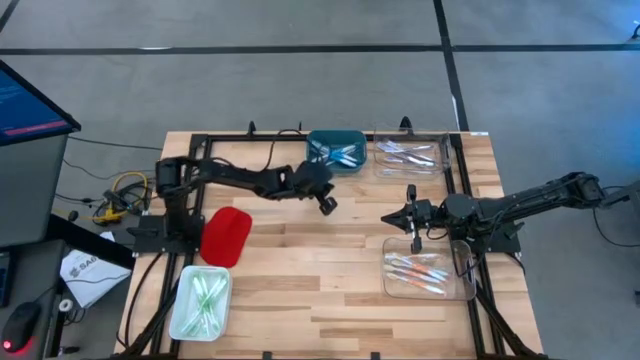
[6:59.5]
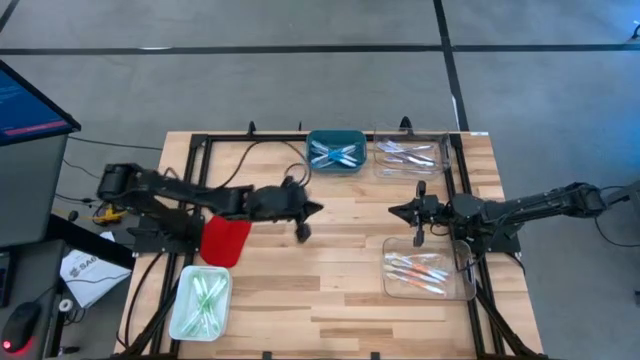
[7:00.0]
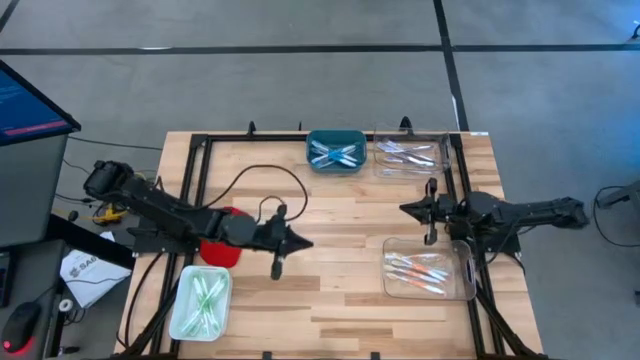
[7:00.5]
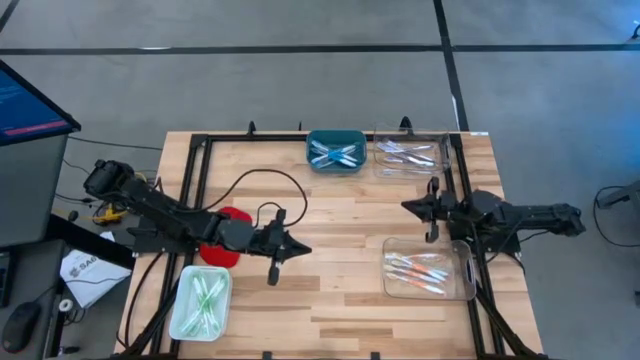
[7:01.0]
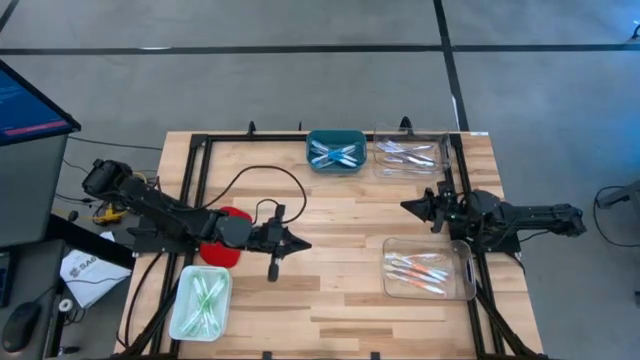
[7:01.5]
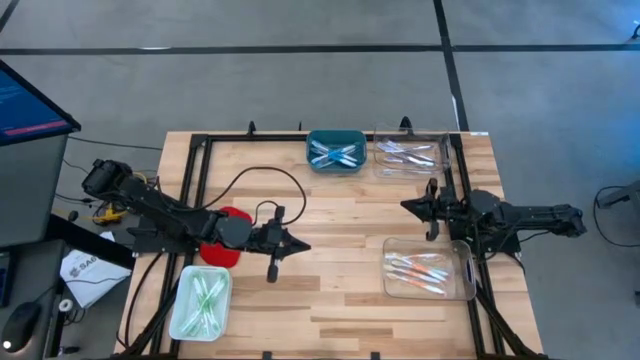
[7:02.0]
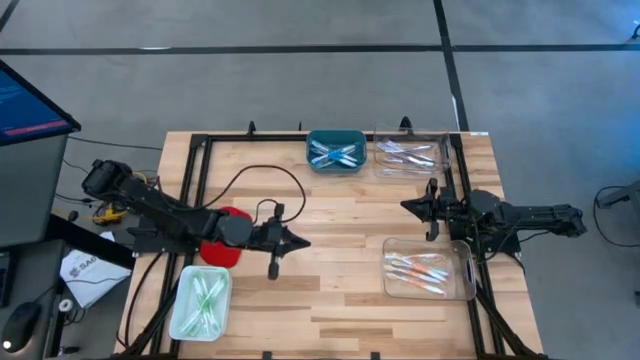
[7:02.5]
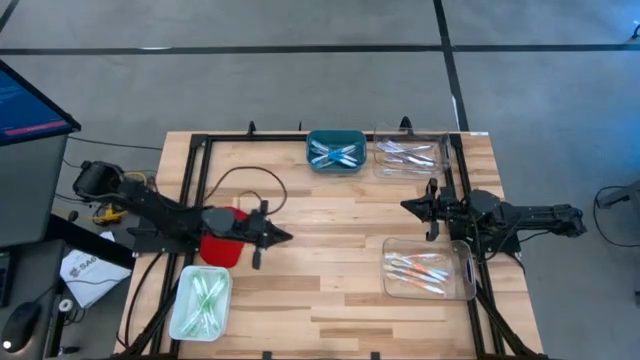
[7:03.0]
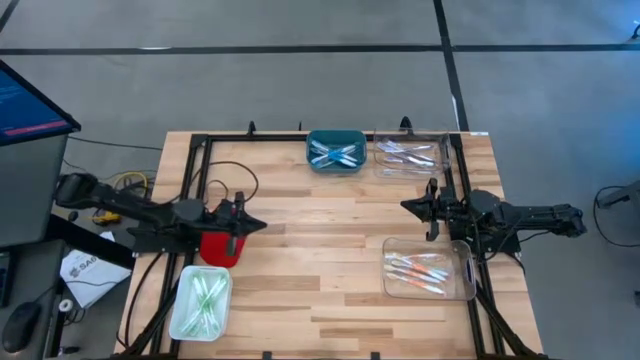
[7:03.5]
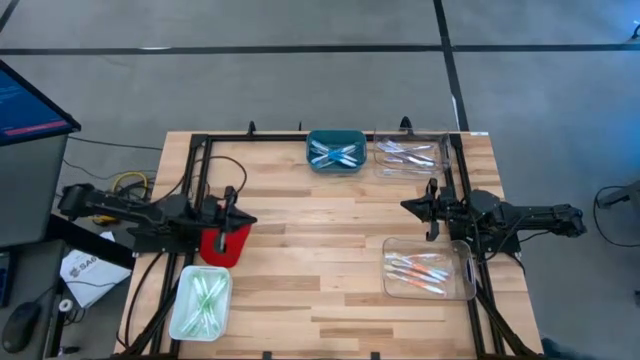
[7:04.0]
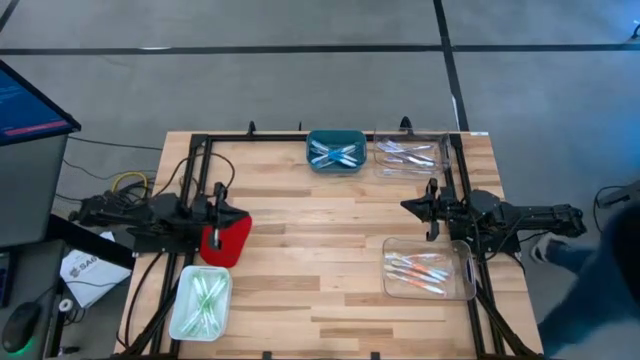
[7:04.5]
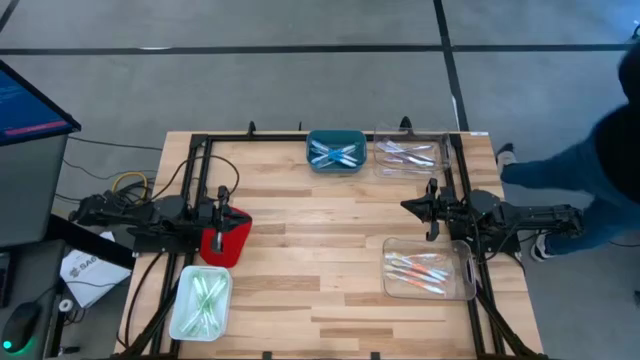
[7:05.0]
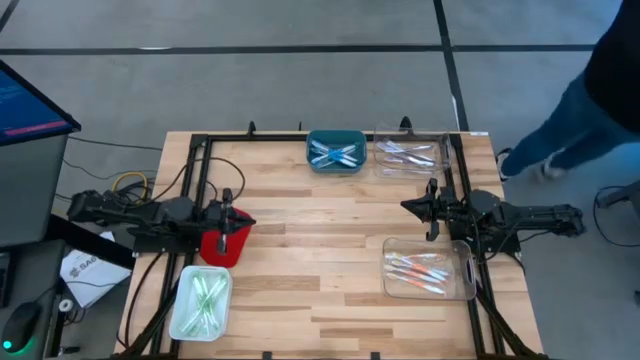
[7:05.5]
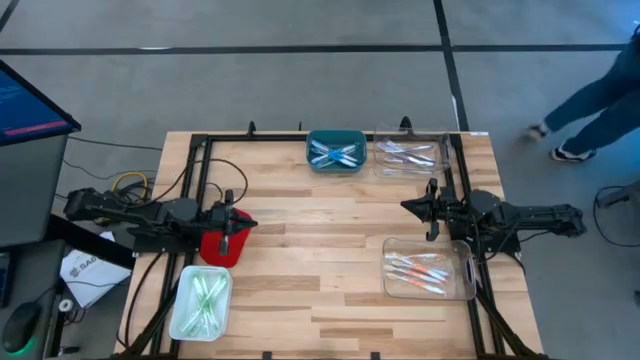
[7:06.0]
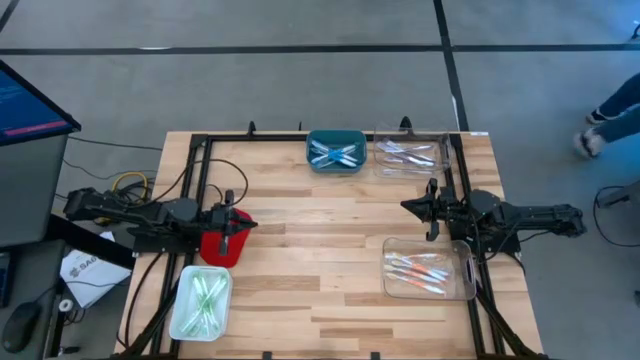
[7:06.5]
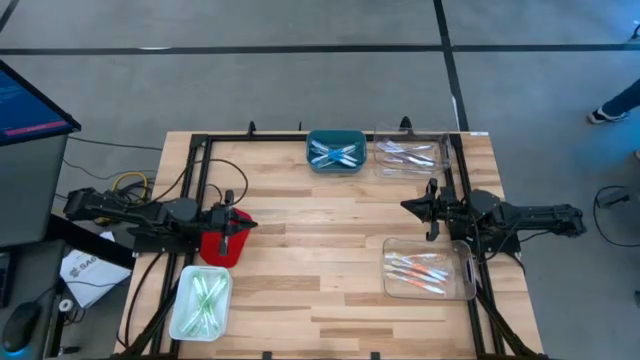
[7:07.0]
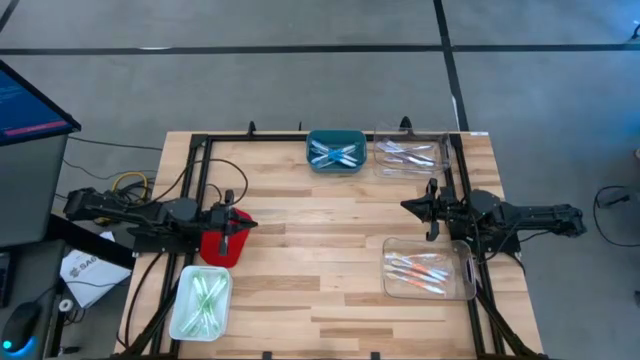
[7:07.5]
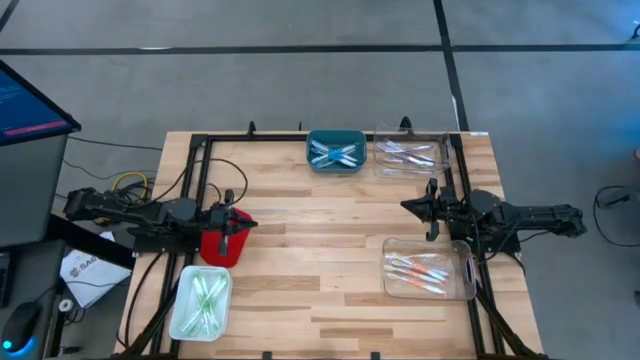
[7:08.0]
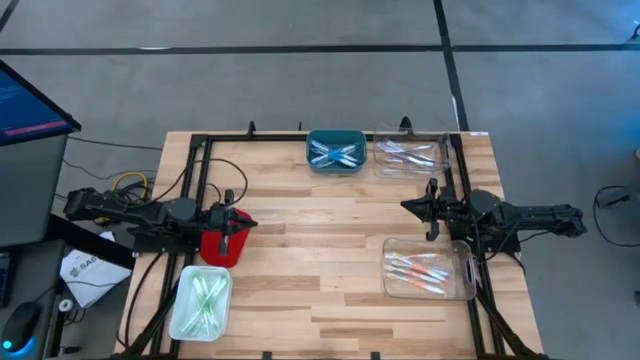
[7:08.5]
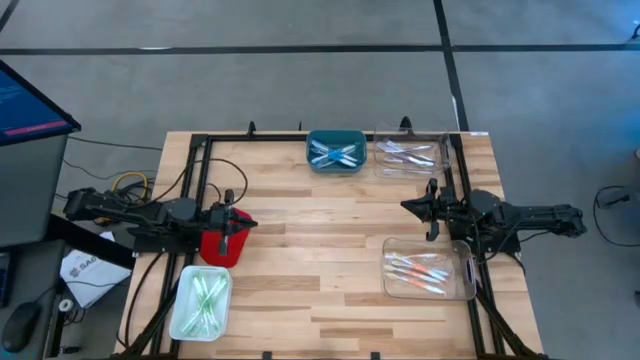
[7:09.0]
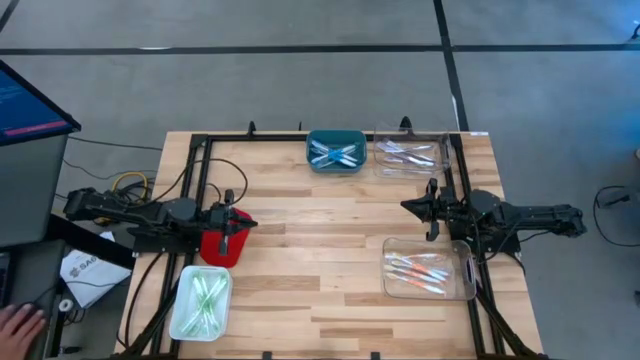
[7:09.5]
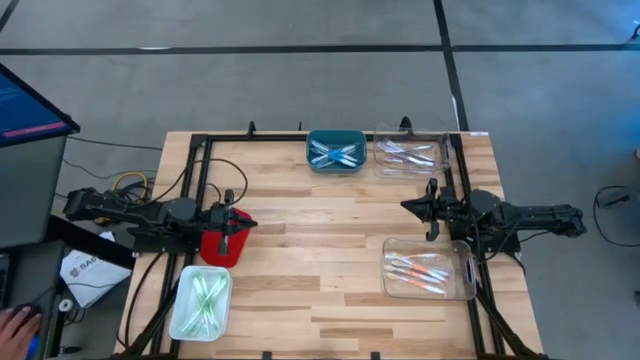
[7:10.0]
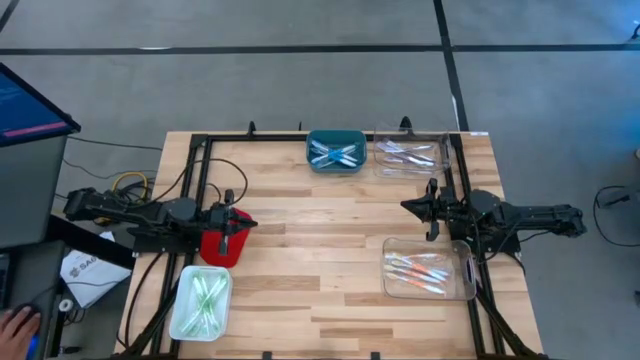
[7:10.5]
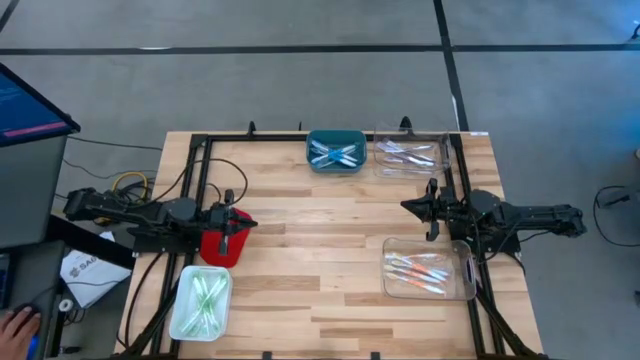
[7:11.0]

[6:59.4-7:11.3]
Task: Pick & Place Toothbrushes
Return to Home Position

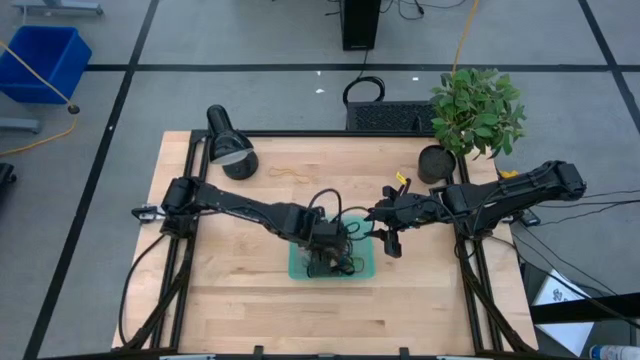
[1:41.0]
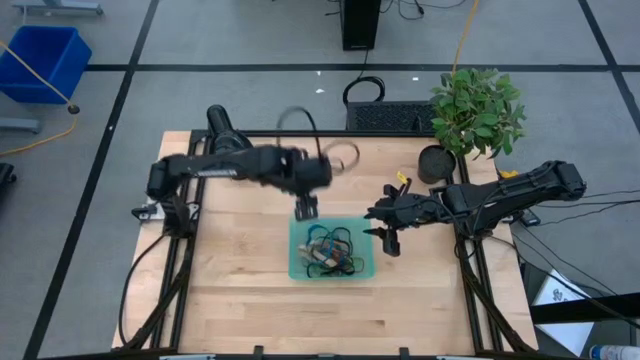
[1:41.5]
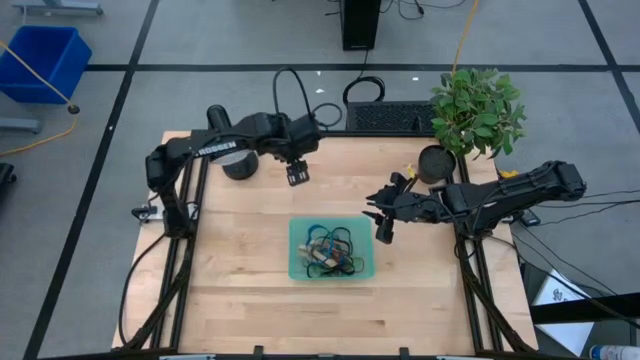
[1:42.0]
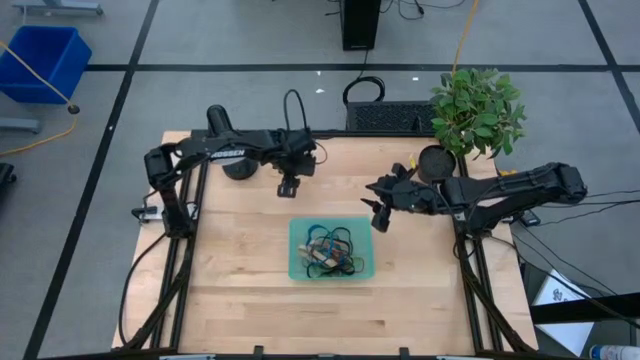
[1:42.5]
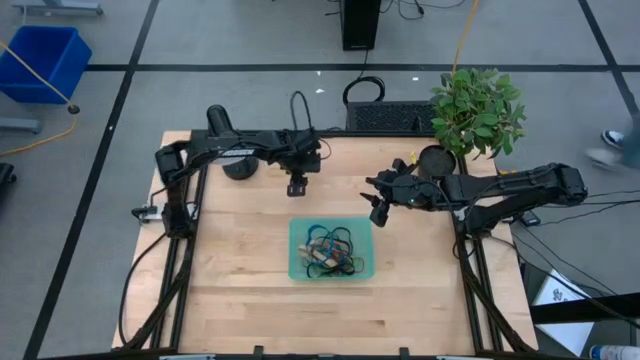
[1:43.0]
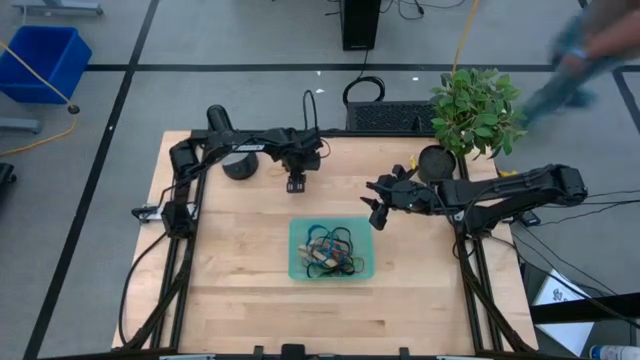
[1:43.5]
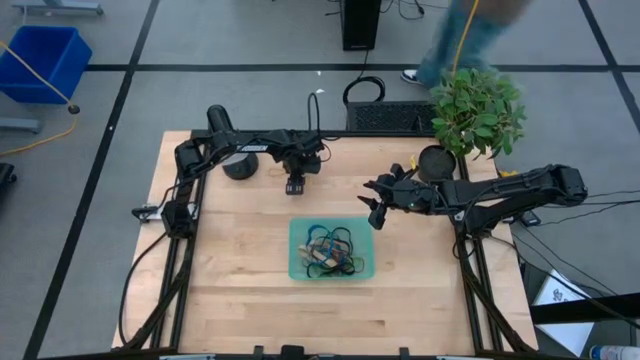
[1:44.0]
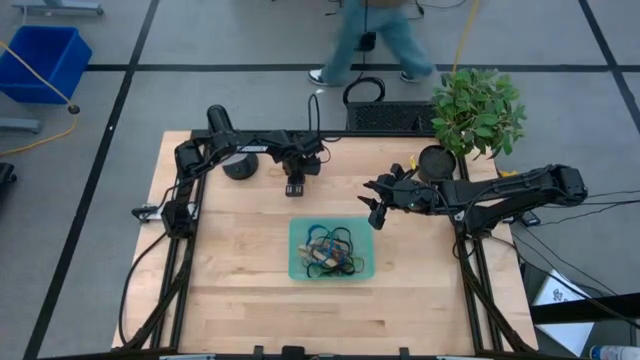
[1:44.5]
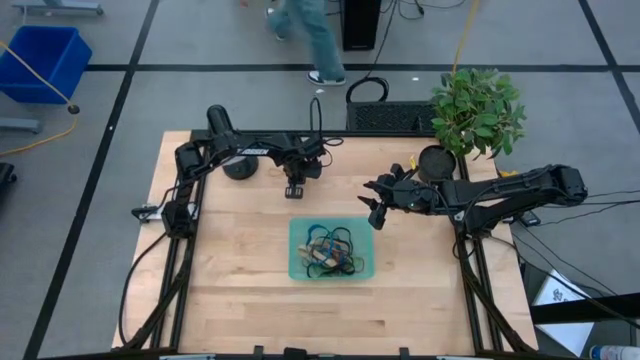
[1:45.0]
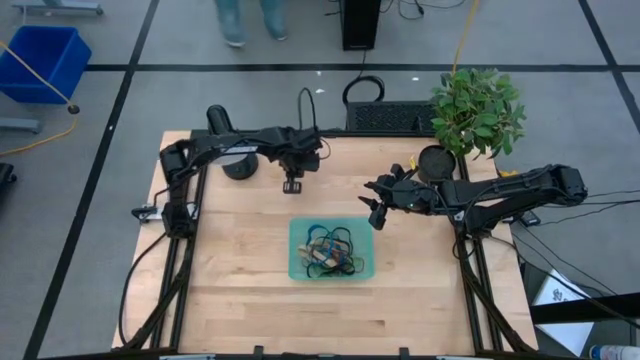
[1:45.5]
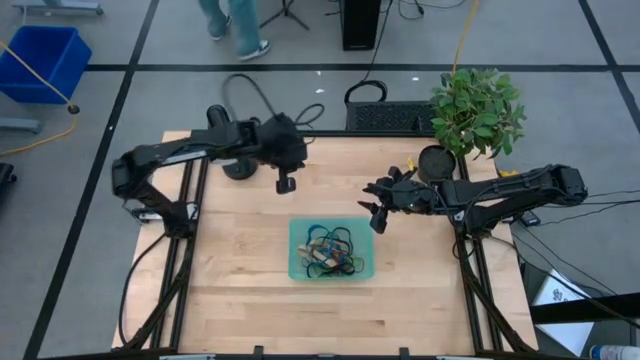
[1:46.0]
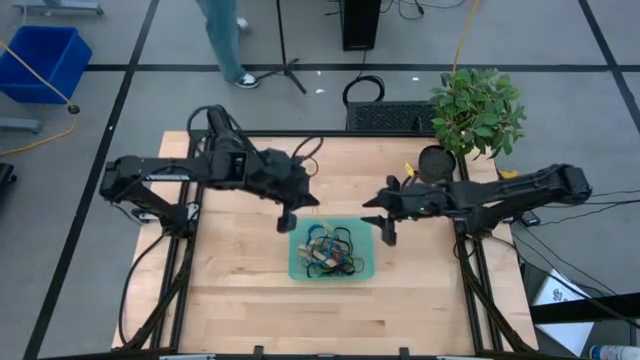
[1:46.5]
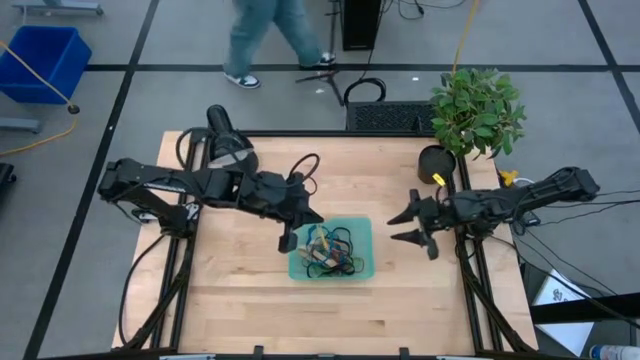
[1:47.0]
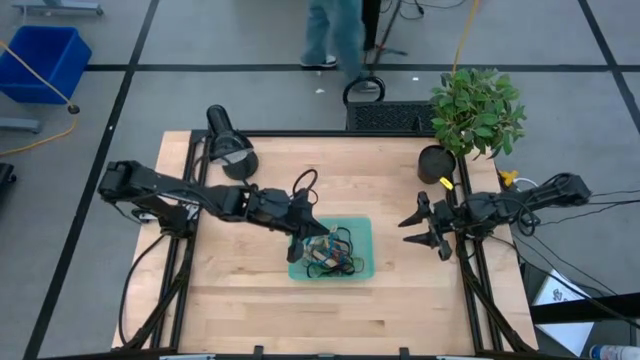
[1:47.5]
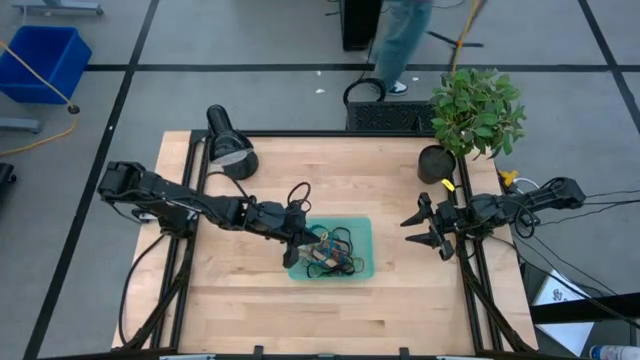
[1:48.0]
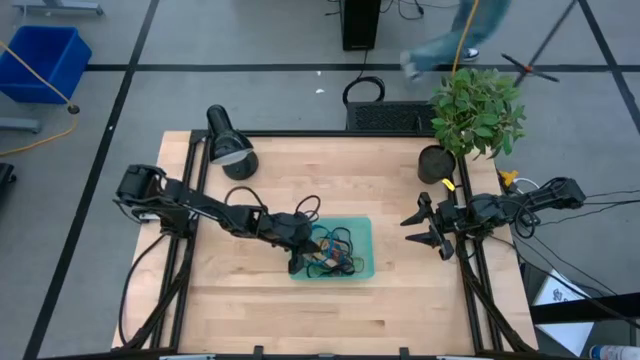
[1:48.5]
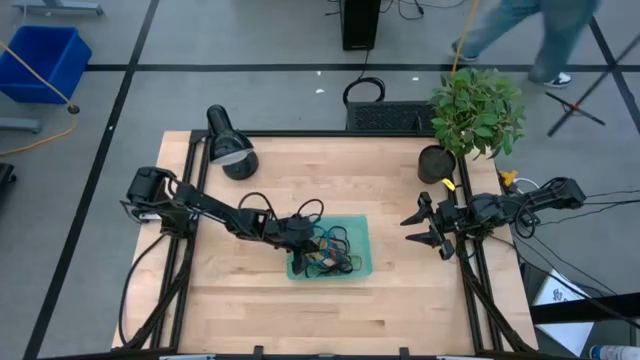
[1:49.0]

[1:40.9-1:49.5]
Task: Pick and place rubber bands into bin
Put the yellow rubber band into the green bin

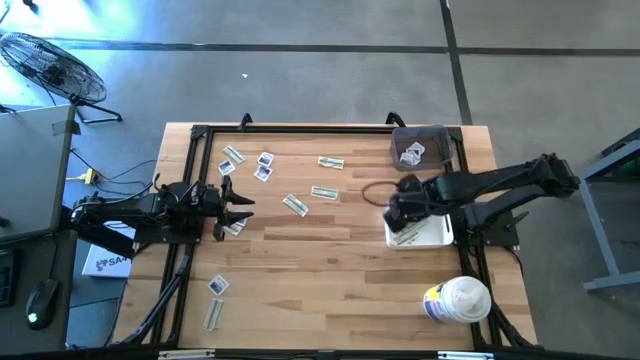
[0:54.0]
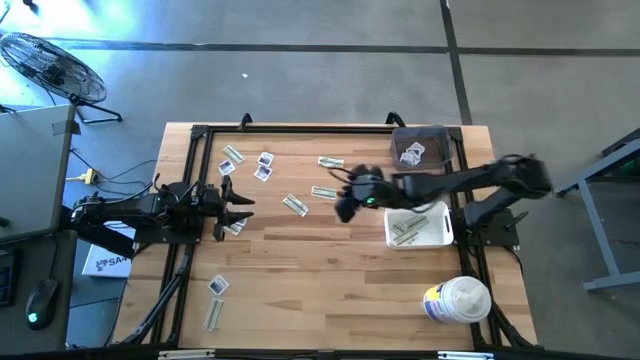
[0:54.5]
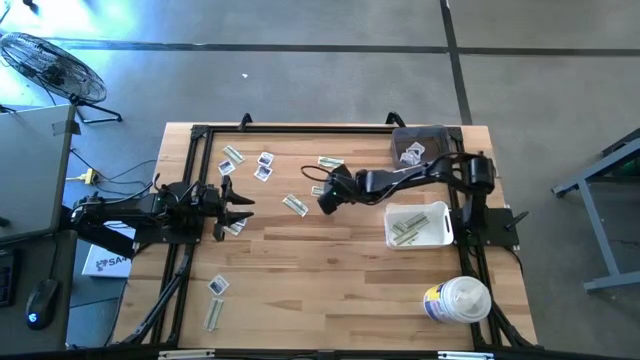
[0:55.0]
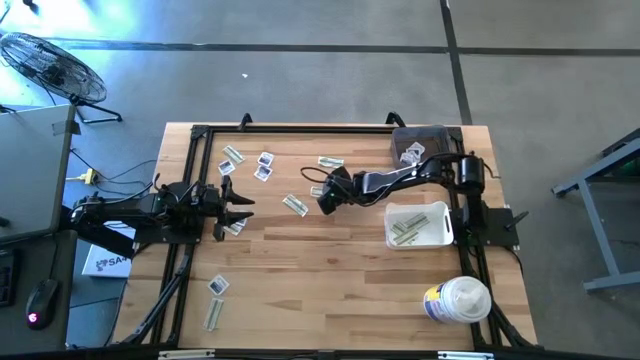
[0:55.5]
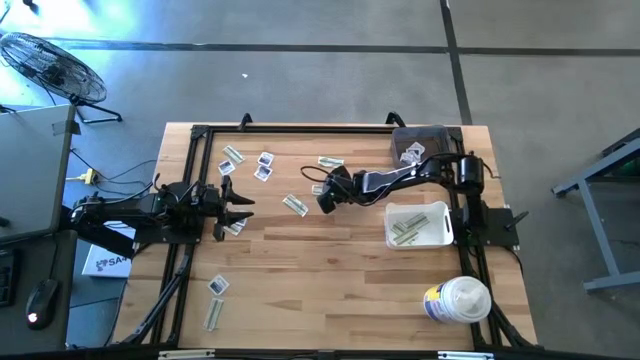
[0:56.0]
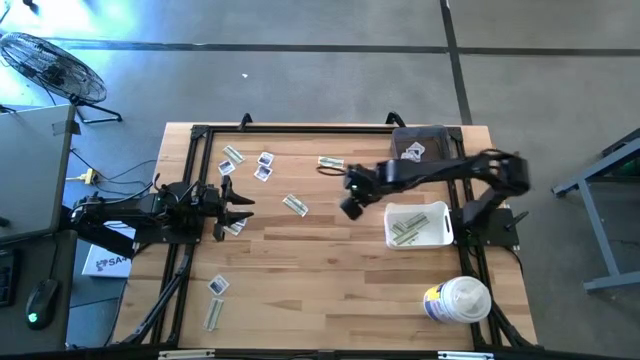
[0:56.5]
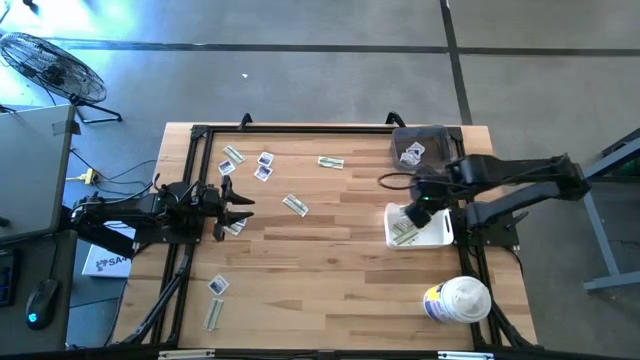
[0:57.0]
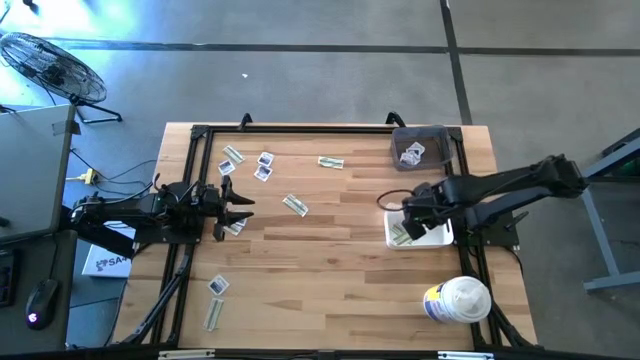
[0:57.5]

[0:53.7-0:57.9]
Task: Pick & Place First Aid Supplies
Put the bandage into the white bin
